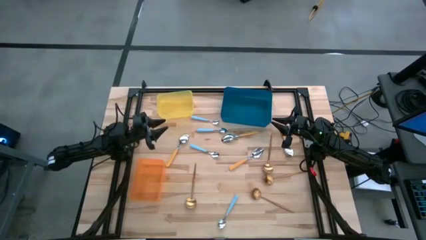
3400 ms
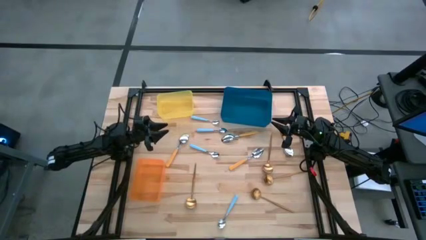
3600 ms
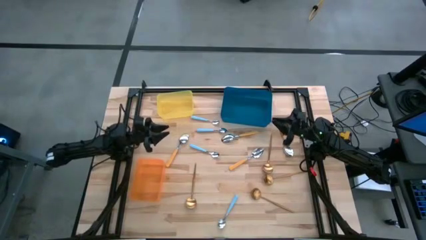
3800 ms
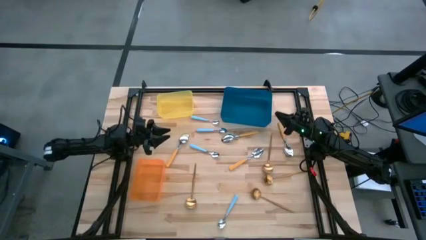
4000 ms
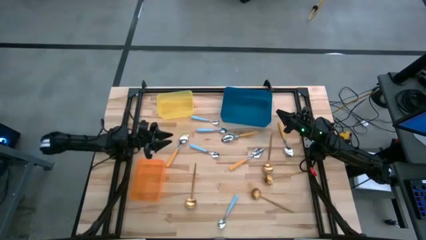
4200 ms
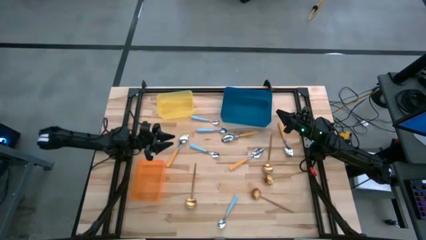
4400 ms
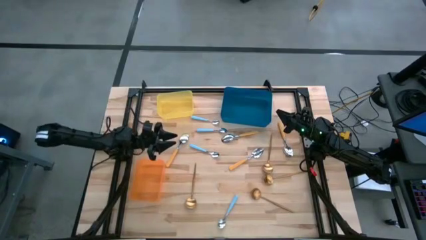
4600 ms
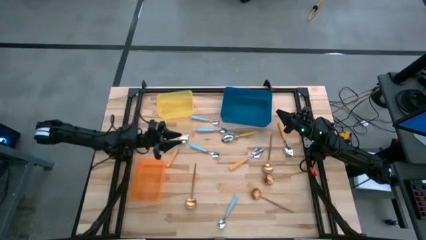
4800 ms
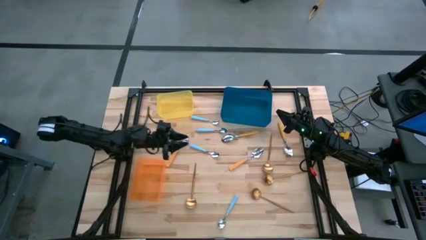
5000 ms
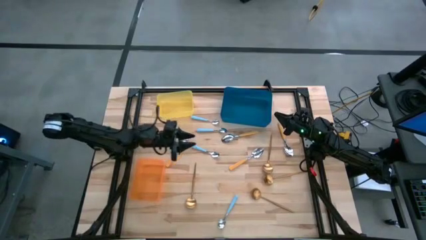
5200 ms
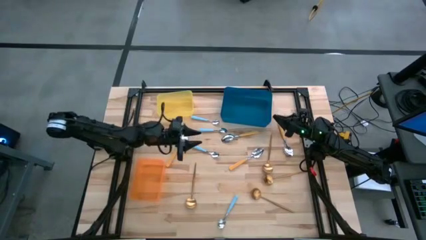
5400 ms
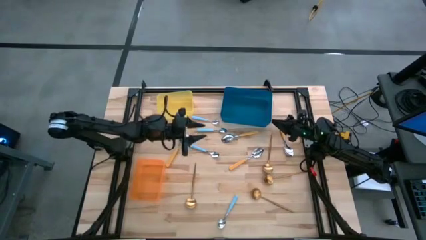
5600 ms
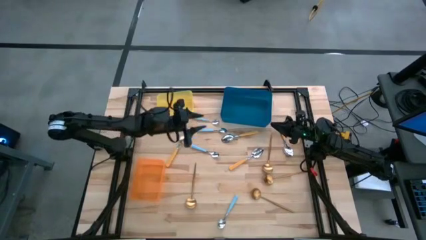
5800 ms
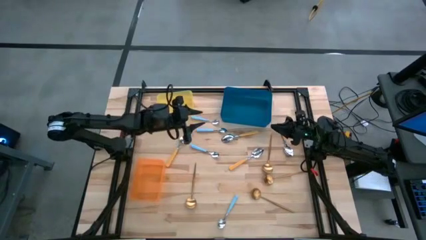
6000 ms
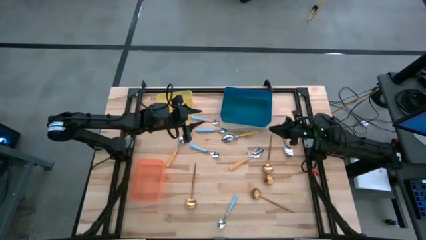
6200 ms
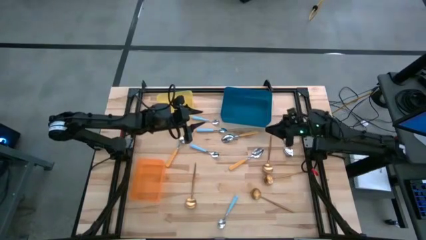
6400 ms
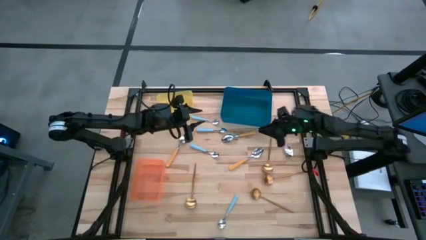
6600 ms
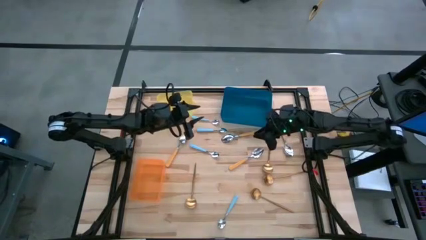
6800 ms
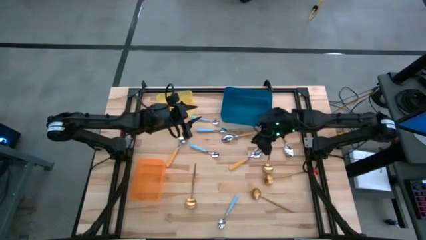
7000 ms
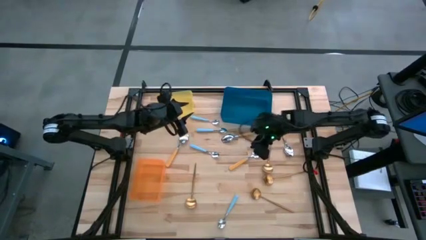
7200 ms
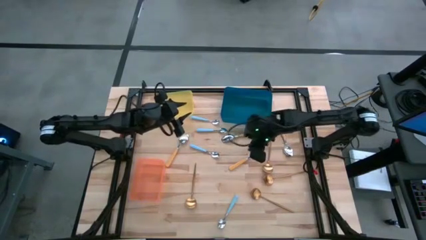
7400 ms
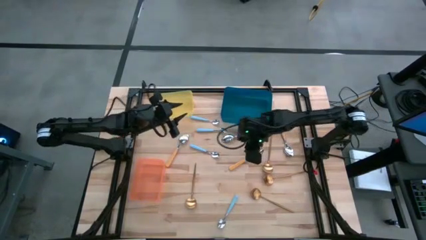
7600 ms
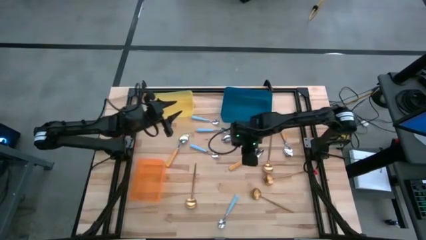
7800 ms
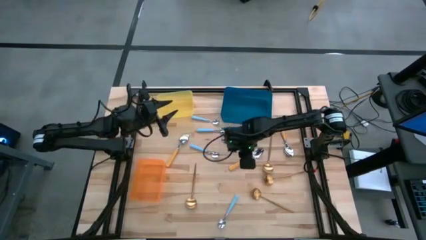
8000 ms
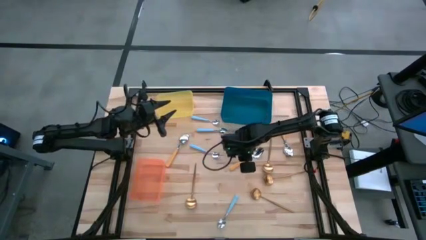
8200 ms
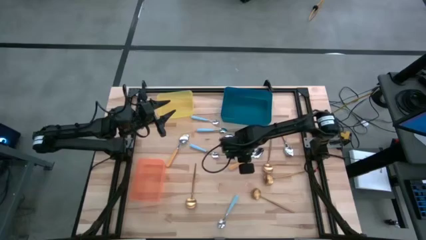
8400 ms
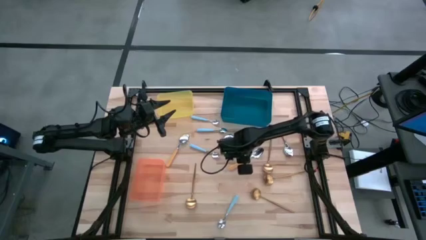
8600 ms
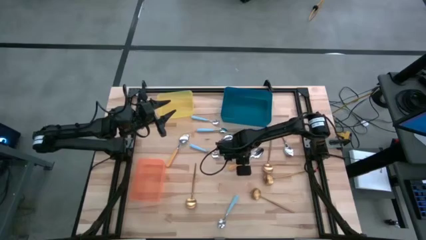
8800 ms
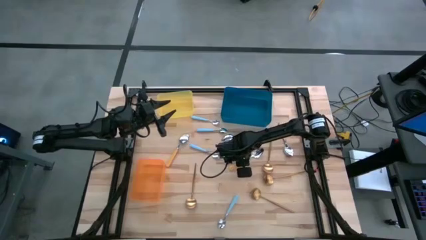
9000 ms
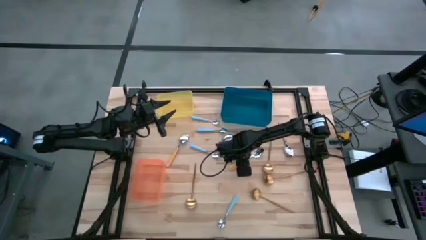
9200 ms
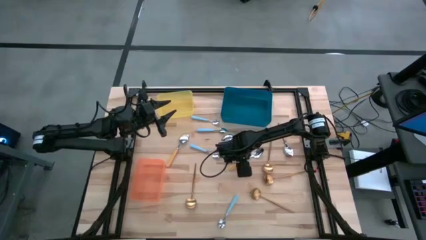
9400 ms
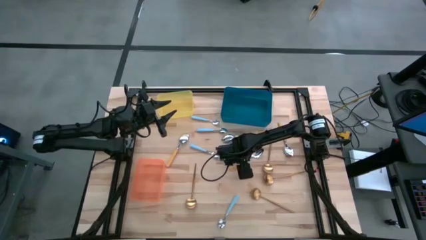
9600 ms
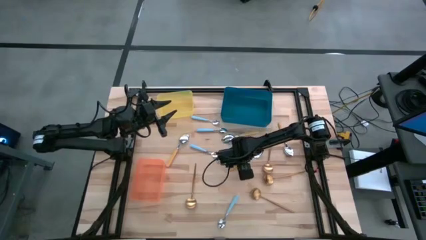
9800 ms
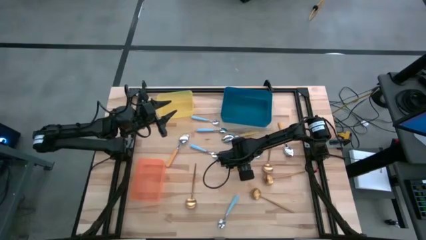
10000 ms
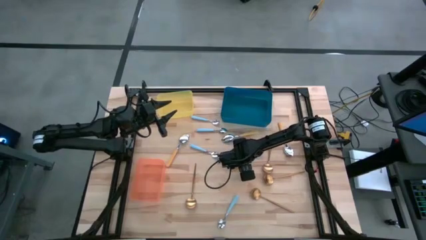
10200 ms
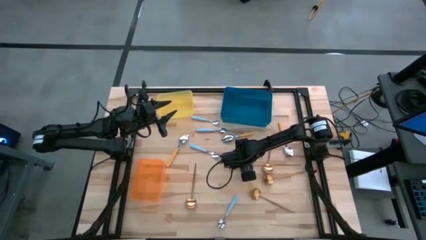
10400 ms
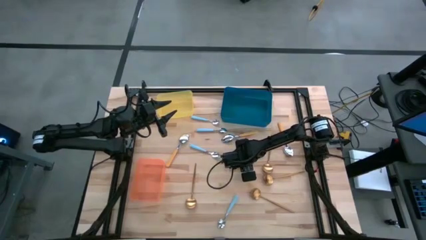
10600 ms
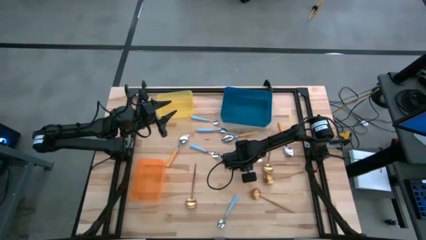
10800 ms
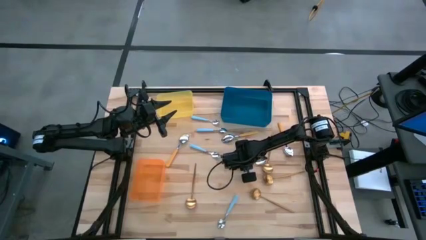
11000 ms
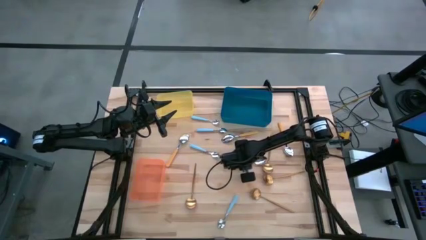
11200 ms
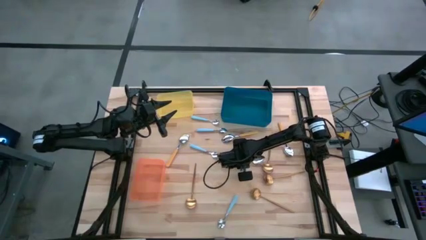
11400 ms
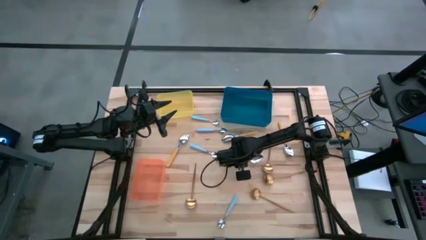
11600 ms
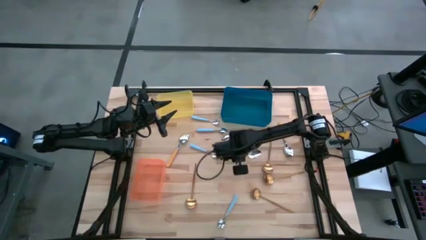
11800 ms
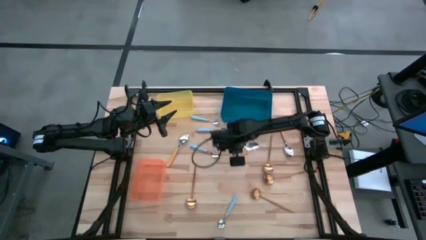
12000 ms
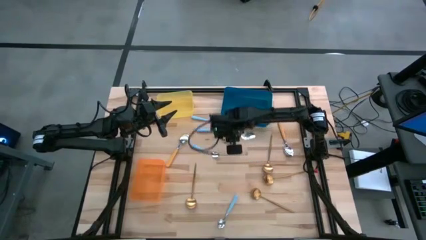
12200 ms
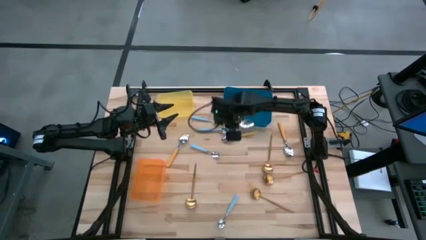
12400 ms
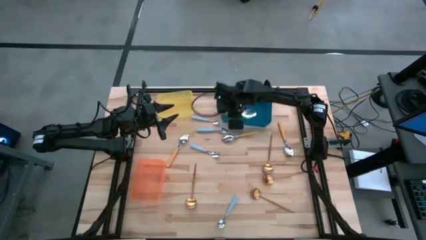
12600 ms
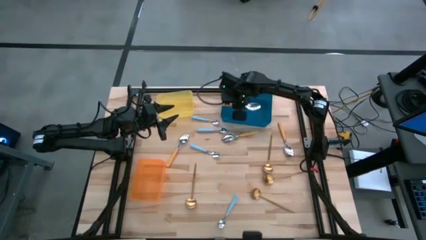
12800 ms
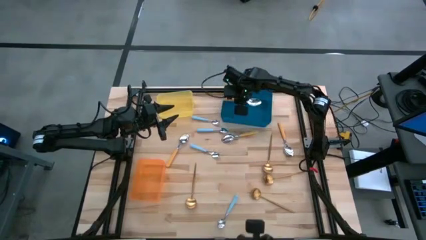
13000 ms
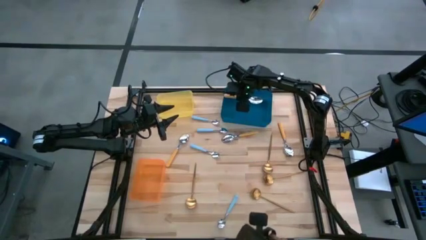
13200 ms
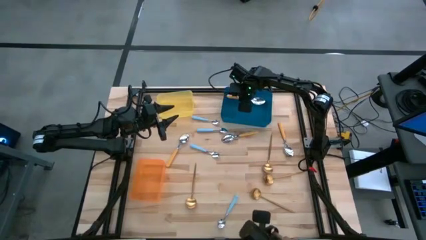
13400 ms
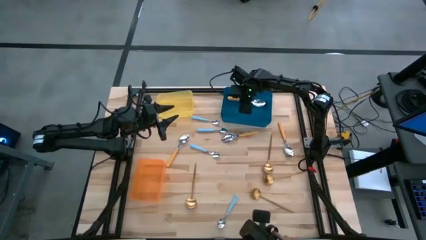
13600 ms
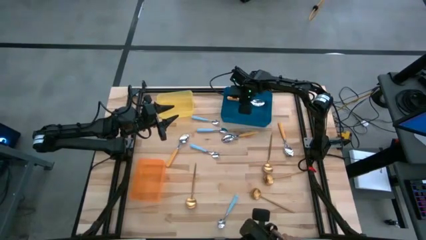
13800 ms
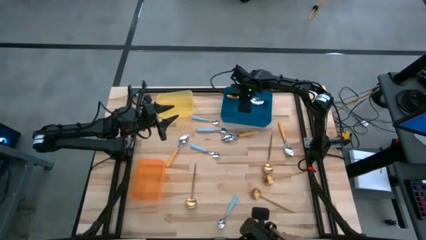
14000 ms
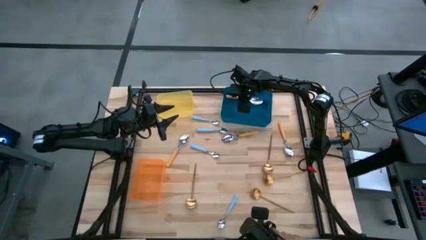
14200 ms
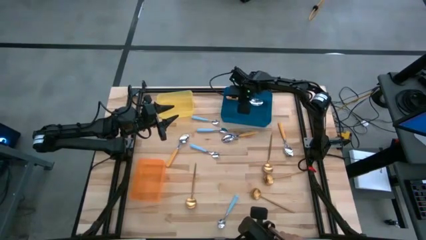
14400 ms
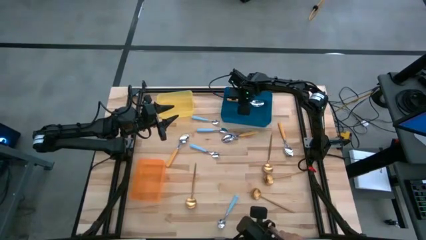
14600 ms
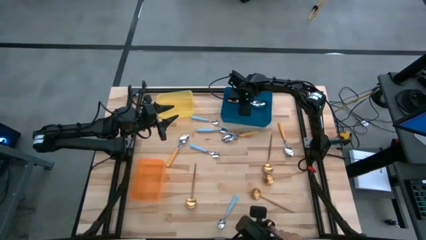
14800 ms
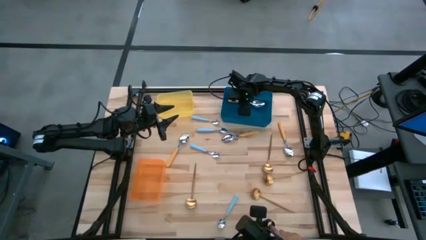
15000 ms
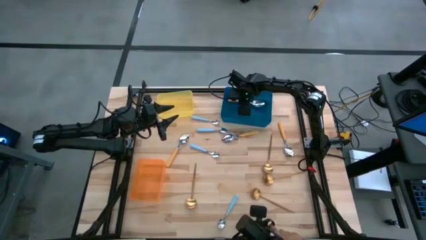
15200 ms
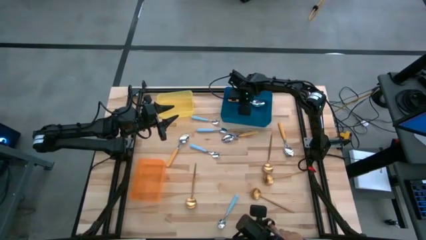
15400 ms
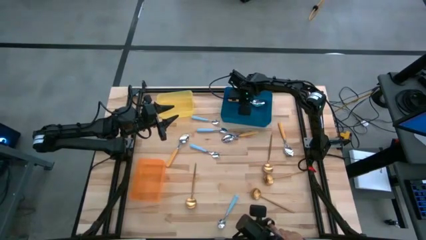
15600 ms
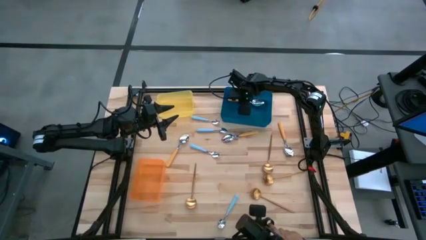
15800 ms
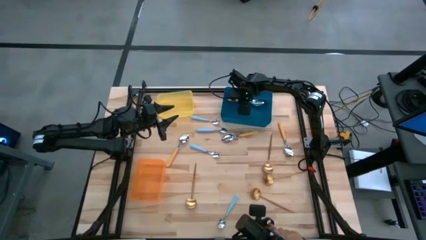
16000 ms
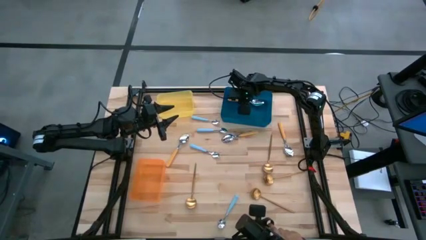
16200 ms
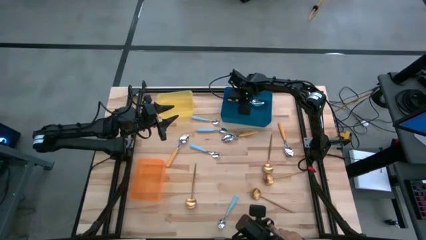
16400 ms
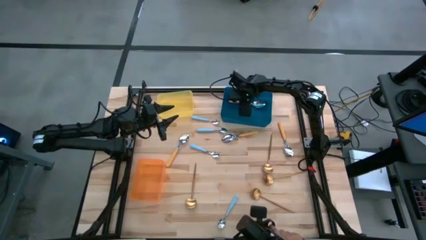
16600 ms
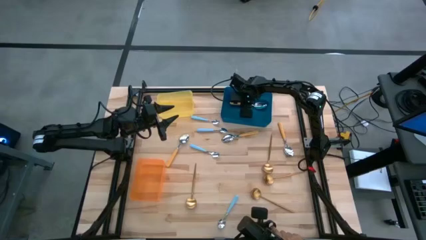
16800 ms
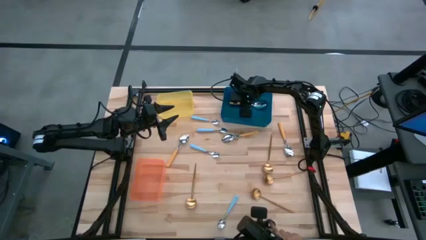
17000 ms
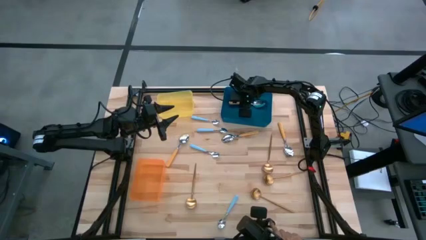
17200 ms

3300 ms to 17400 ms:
Task: Sort silverware by color (type)
Put the orange spoon into the blue bin

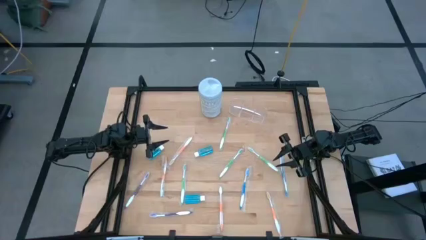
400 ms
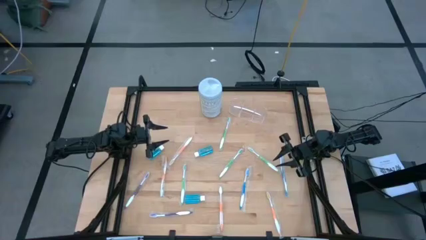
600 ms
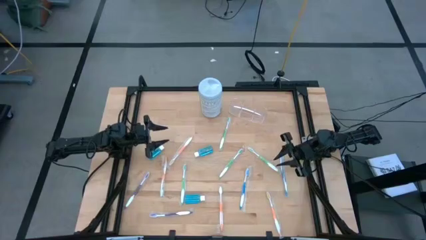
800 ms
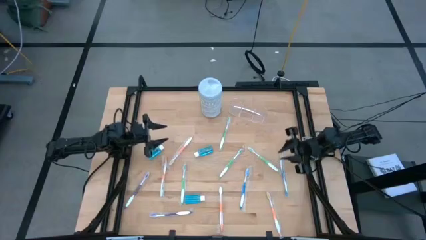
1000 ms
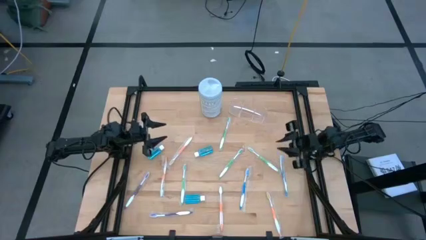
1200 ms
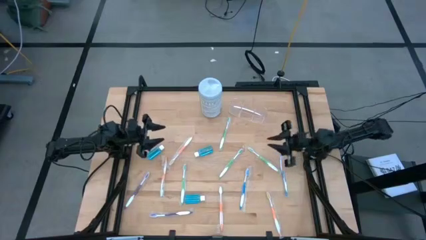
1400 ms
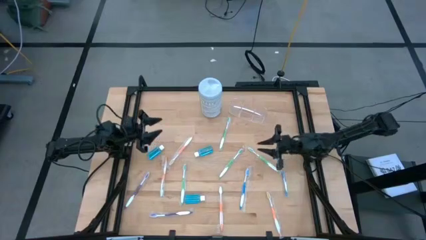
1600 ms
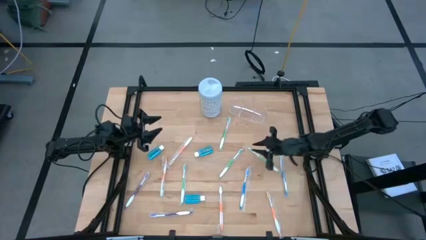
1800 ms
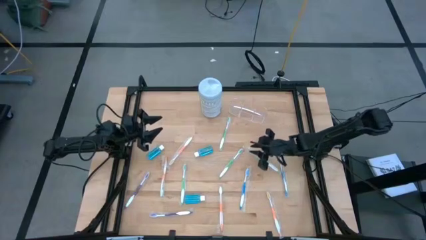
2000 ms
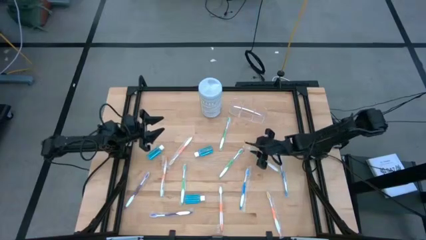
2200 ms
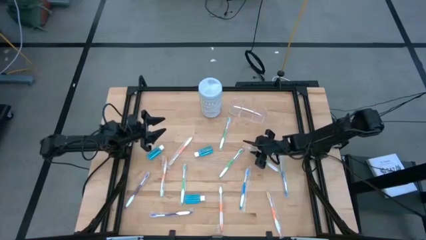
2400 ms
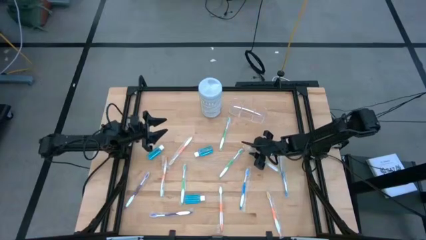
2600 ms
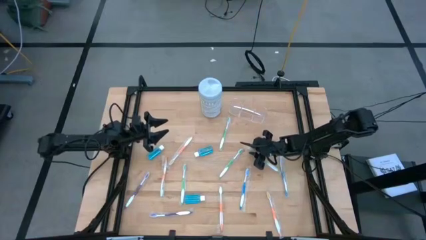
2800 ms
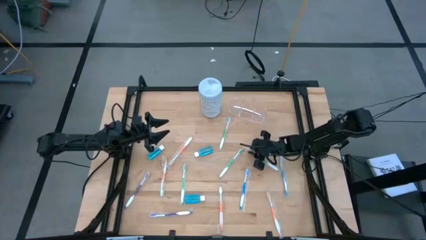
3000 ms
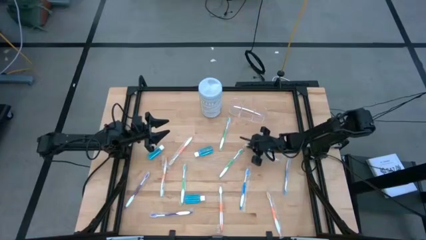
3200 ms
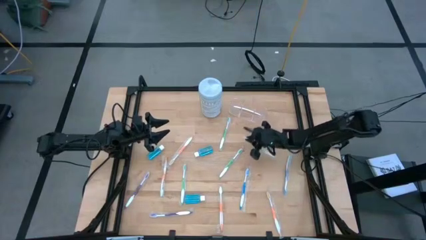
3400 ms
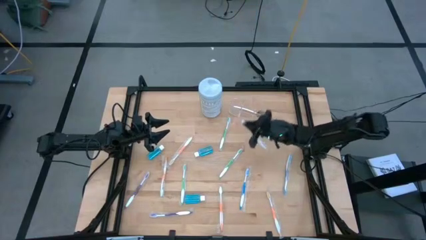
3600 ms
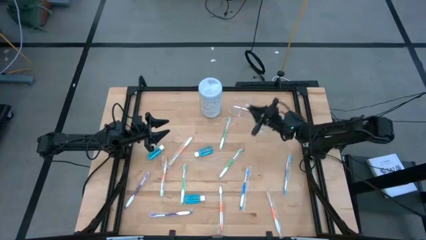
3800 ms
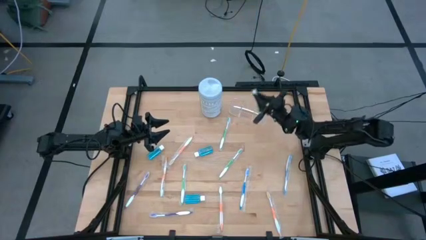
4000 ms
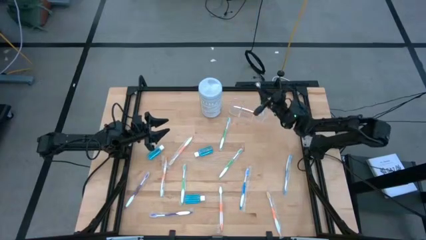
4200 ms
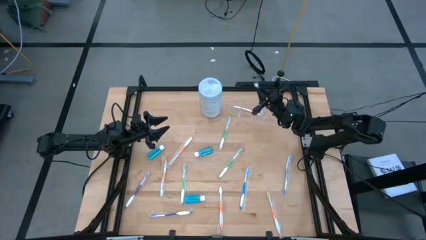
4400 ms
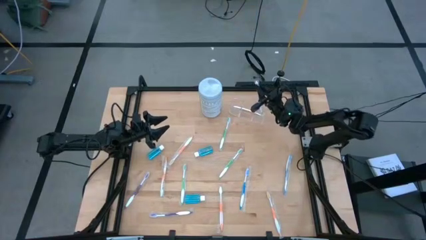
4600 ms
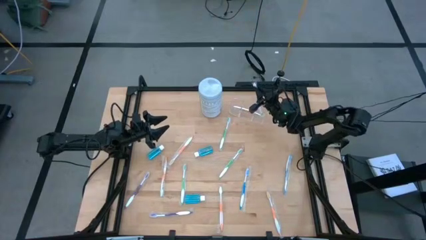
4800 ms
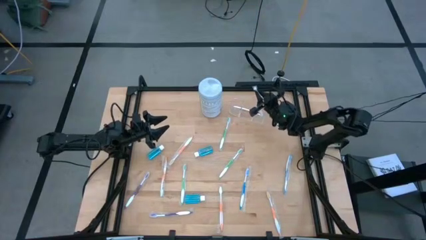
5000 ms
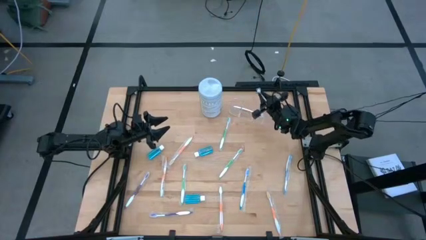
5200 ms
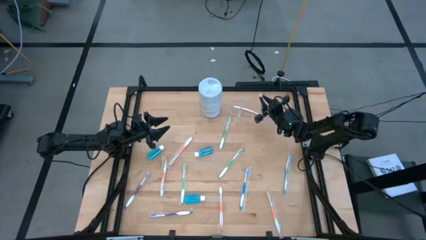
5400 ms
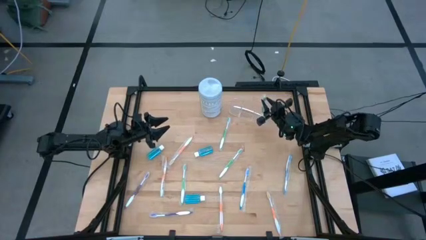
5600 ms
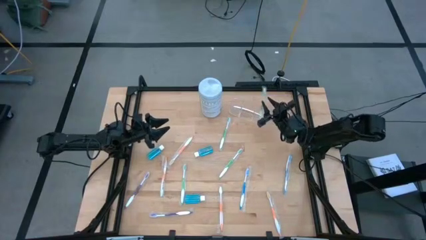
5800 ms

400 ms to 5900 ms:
Task: Pick & Place toothbrushing station
Put the white and green toothbrush into the transparent mesh organizer
